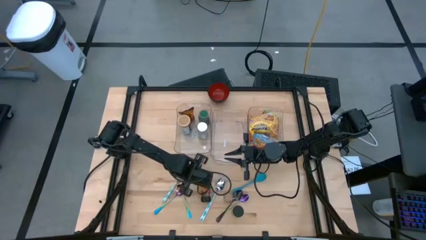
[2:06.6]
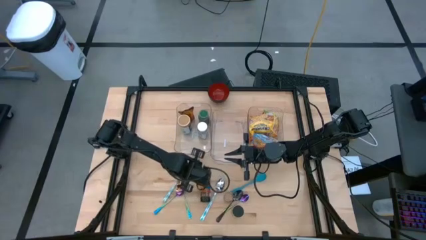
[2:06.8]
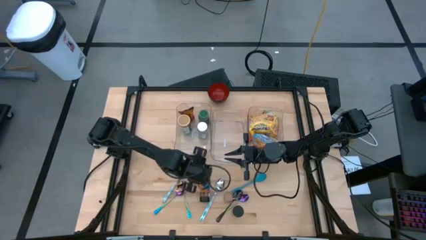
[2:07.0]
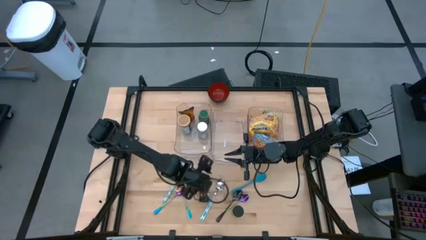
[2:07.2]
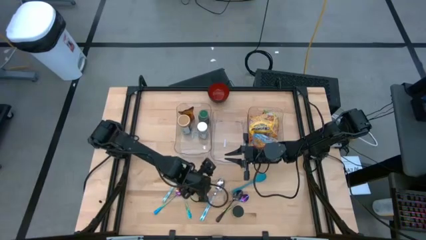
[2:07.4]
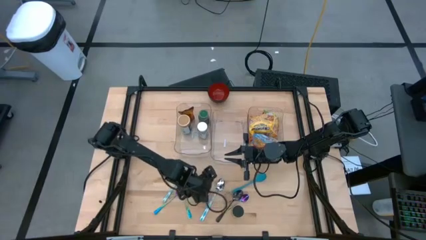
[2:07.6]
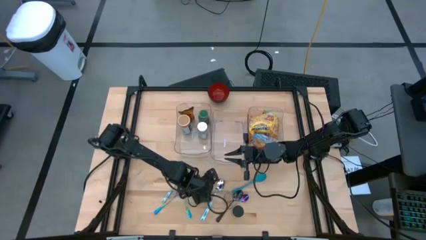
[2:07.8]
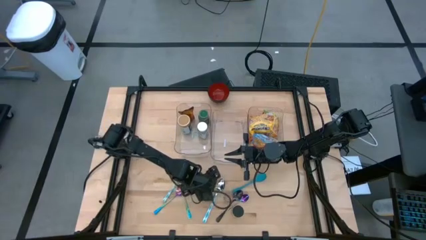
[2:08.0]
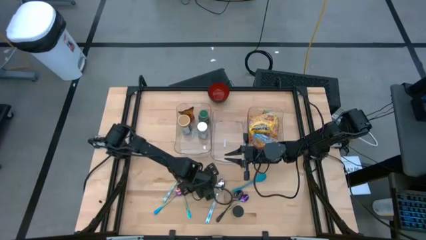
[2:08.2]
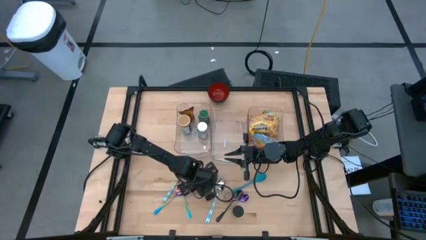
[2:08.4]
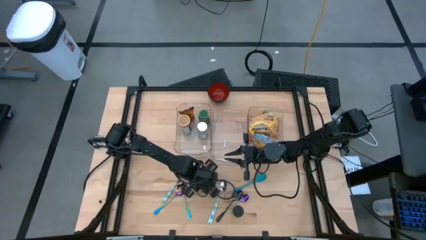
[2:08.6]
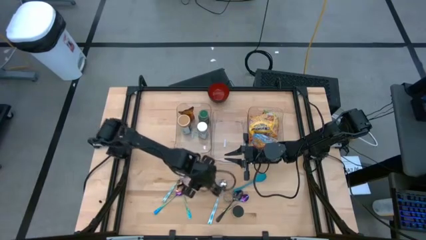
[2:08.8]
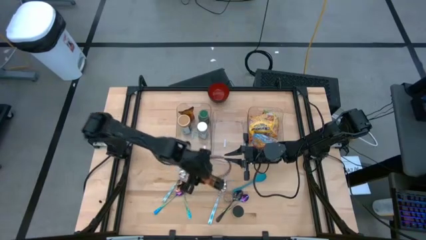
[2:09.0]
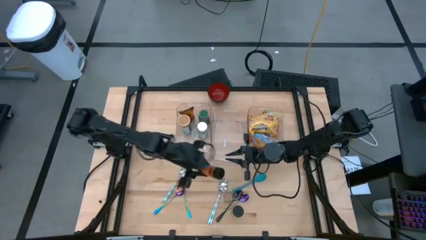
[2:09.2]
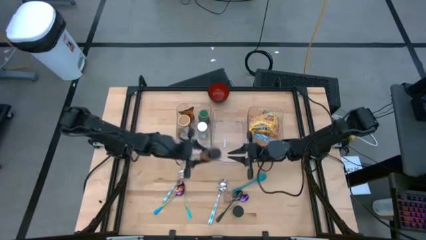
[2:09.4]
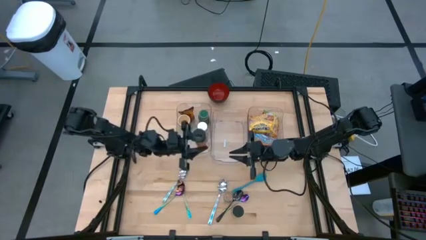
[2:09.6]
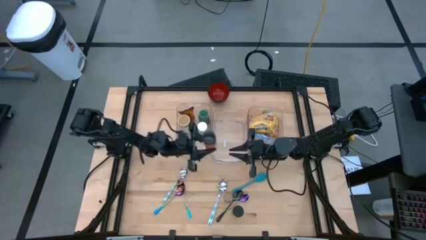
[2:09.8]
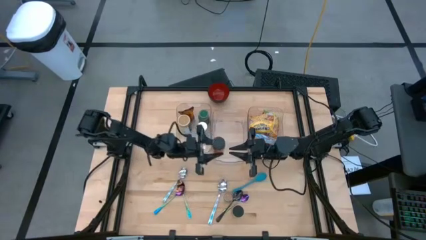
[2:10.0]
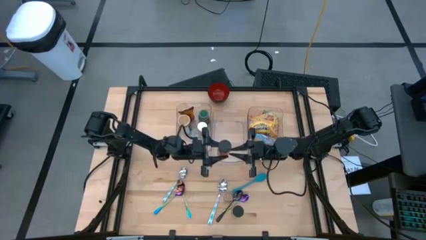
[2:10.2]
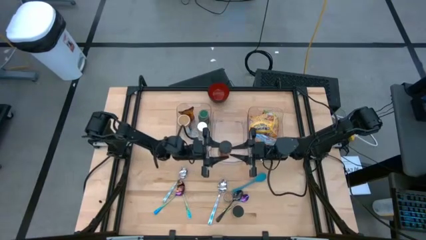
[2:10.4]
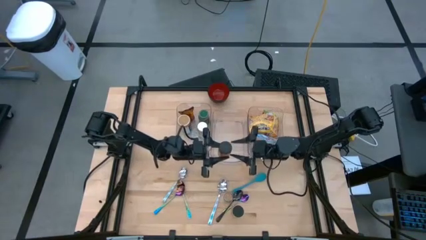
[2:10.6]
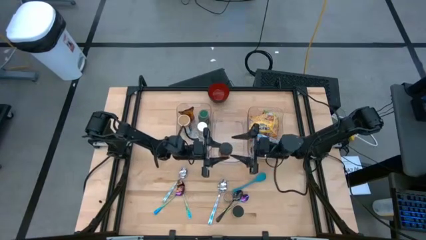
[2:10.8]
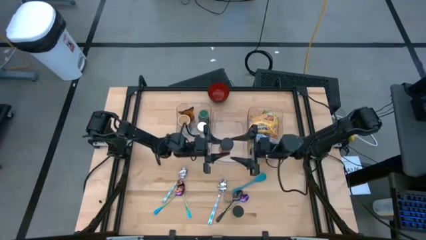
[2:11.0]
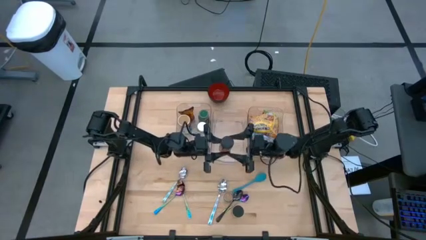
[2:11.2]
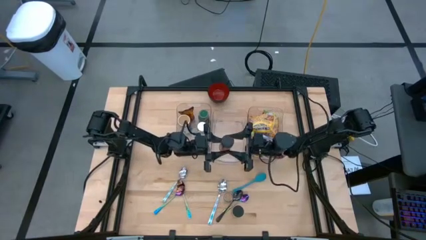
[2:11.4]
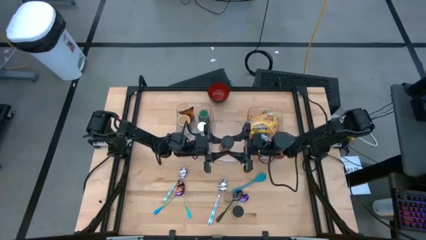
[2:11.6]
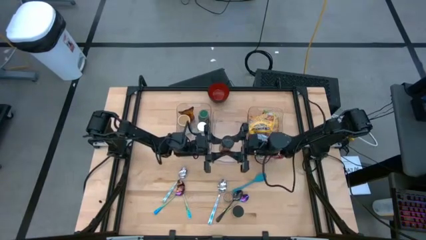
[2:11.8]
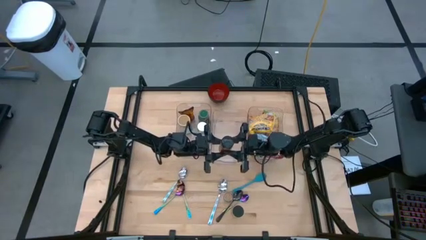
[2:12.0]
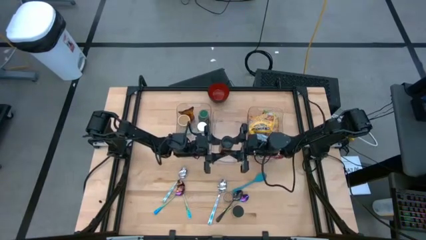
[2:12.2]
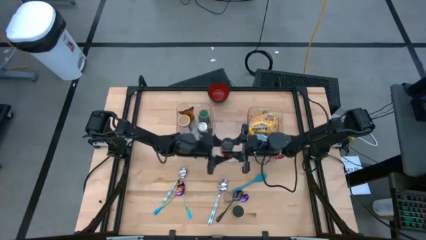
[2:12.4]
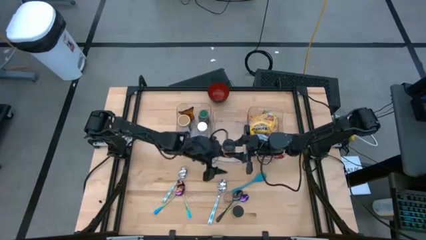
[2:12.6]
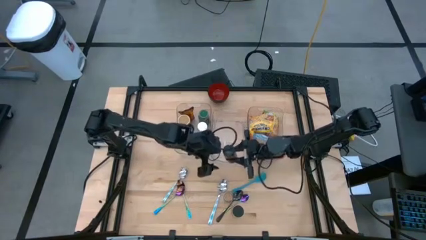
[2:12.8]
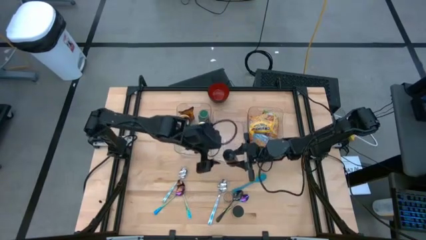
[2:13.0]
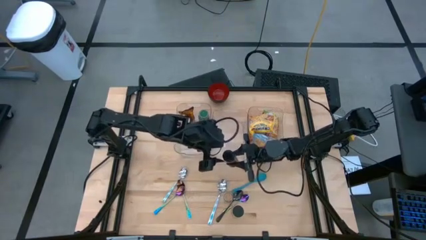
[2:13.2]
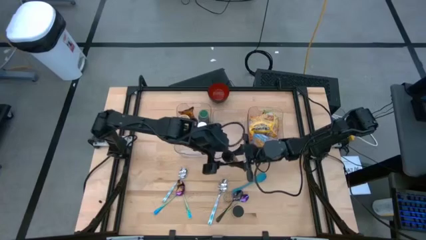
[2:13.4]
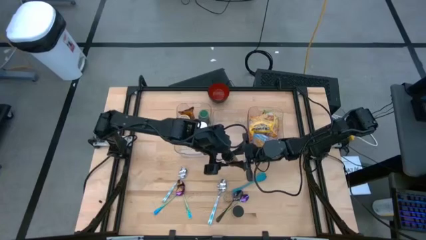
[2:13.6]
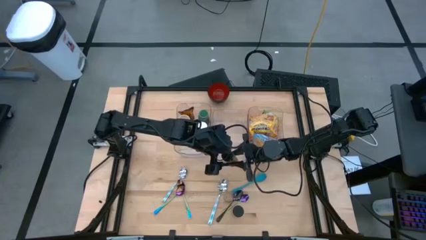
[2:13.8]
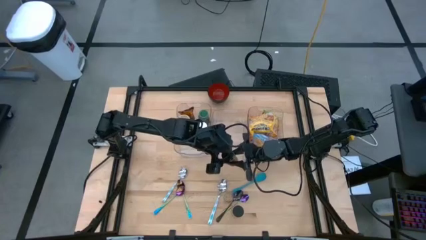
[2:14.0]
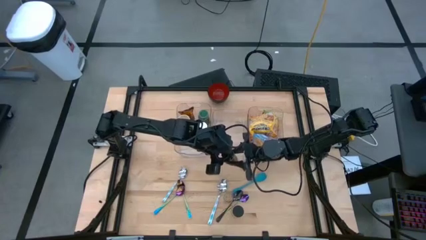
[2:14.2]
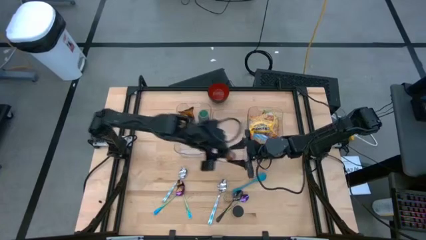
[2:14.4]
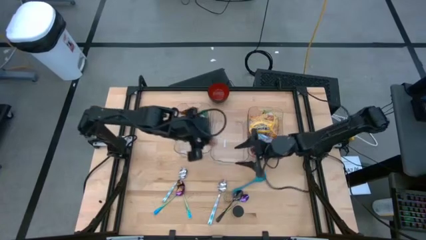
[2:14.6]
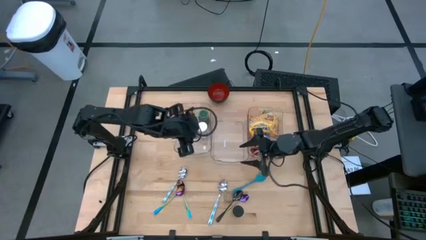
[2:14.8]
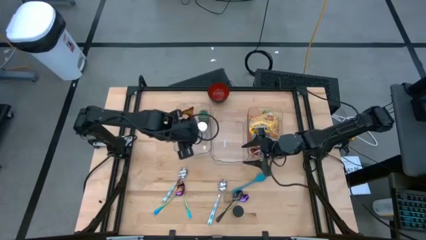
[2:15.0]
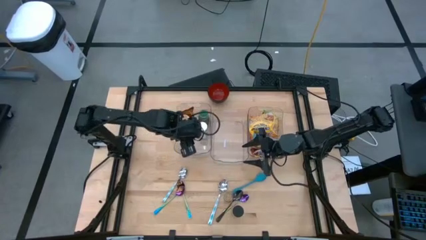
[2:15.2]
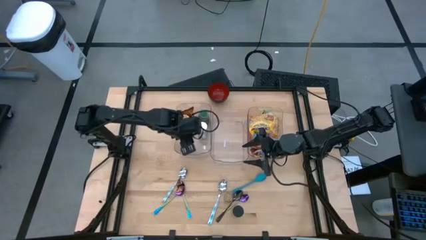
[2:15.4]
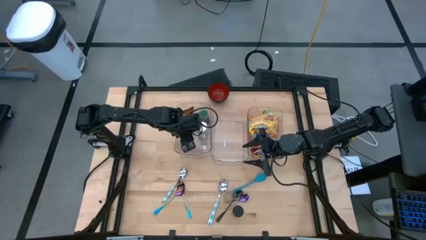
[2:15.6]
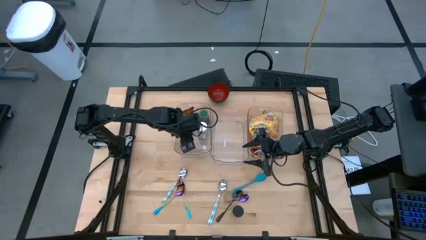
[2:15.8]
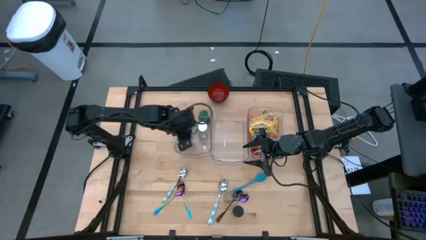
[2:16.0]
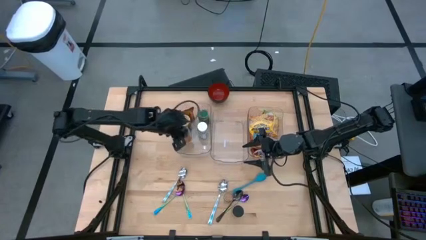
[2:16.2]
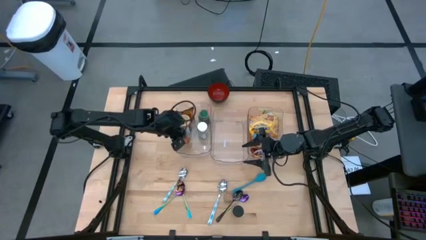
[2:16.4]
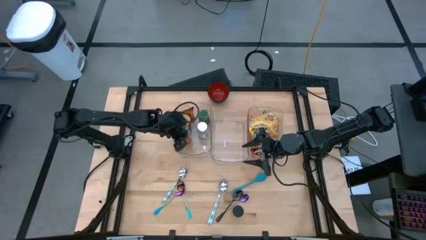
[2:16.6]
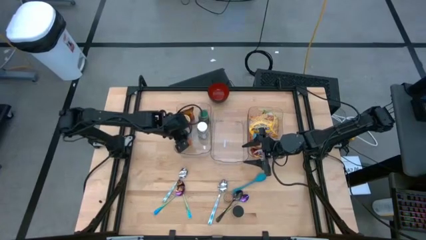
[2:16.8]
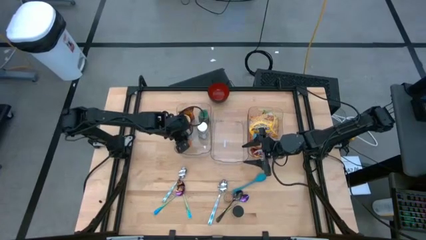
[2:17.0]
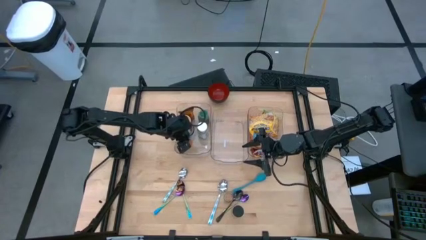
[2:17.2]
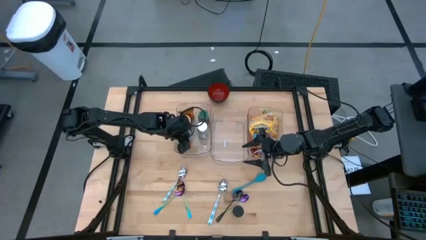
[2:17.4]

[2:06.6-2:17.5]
Task: Pick & Place Food Item
Put the orange seasoning bottle into the left transparent bin
